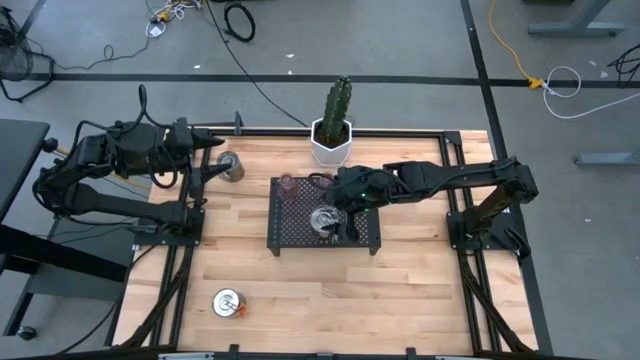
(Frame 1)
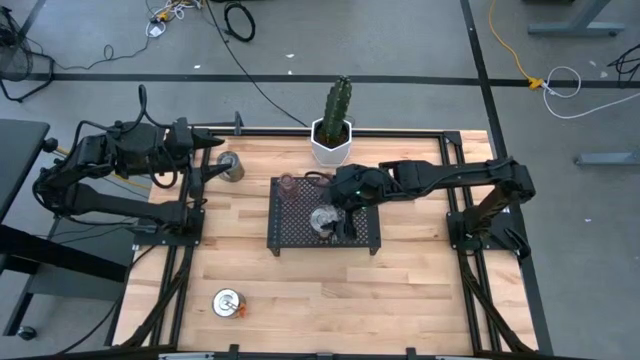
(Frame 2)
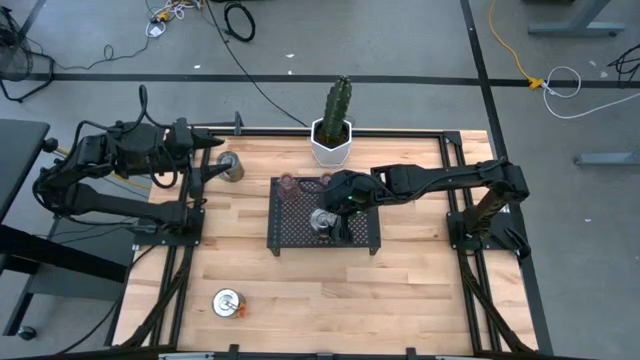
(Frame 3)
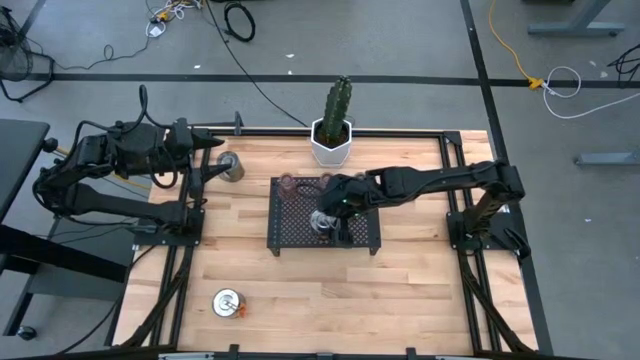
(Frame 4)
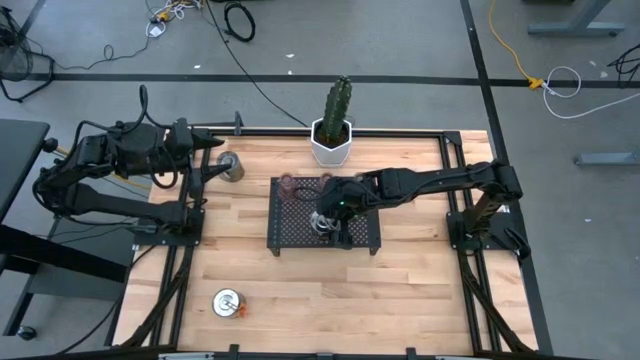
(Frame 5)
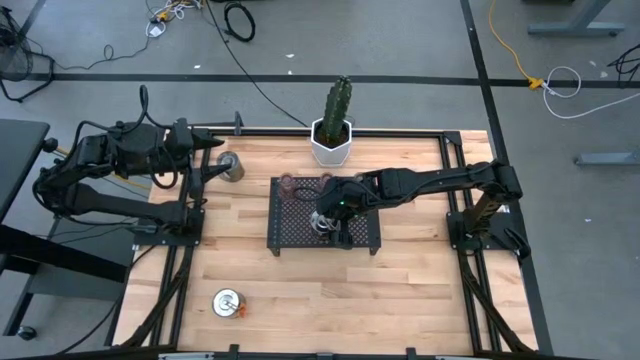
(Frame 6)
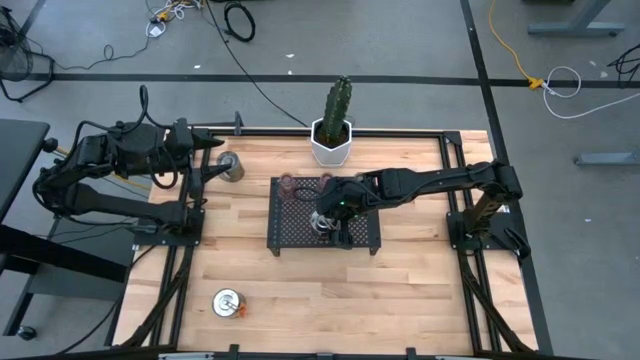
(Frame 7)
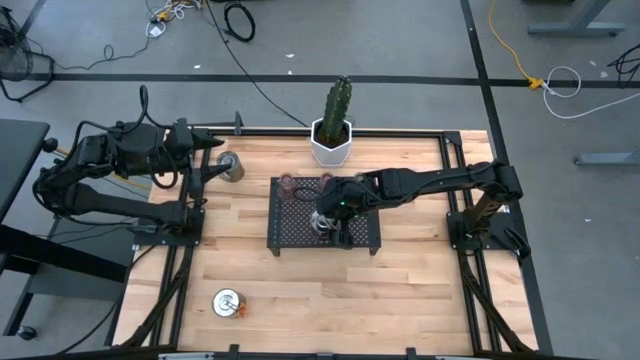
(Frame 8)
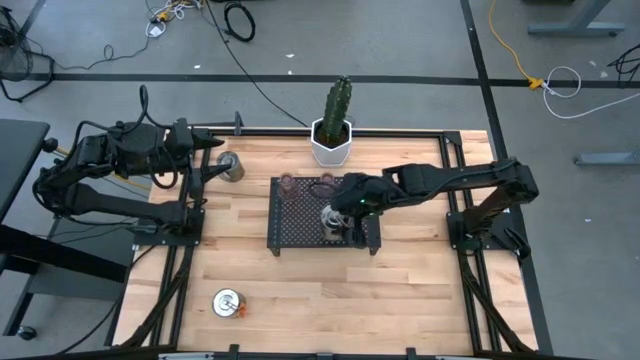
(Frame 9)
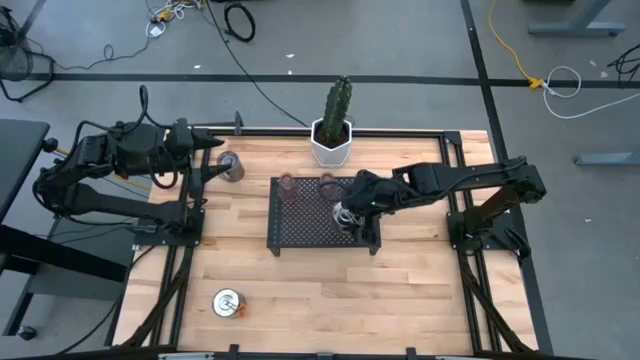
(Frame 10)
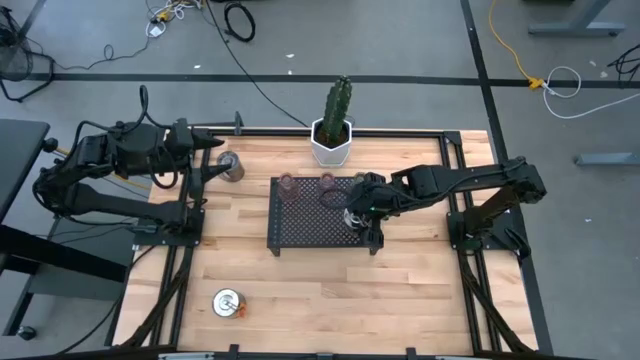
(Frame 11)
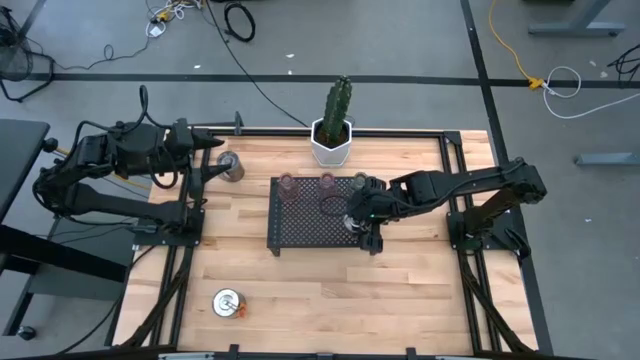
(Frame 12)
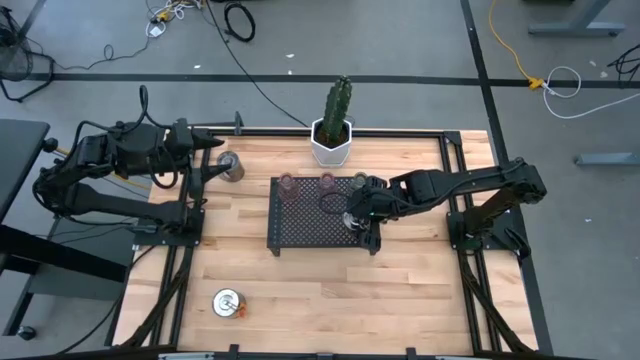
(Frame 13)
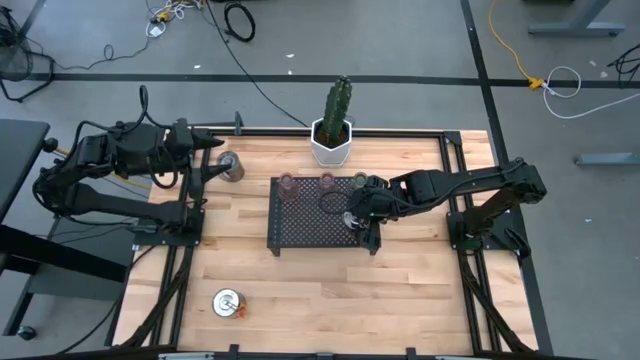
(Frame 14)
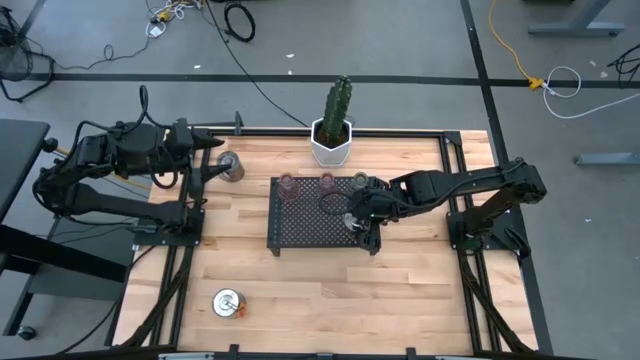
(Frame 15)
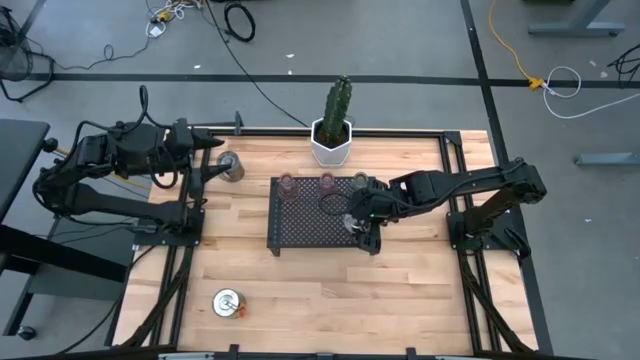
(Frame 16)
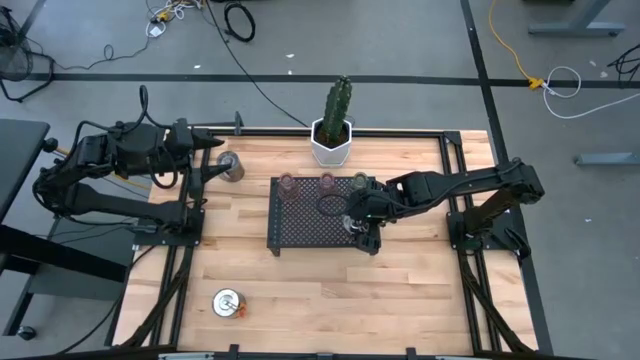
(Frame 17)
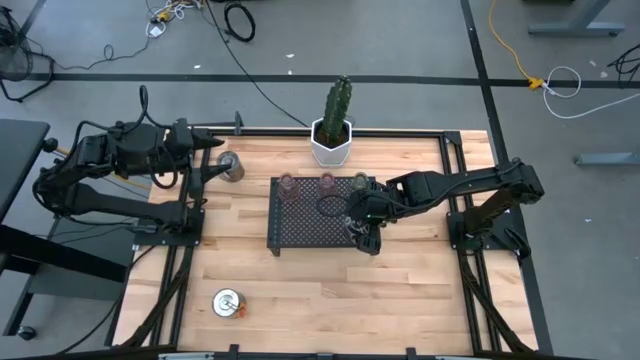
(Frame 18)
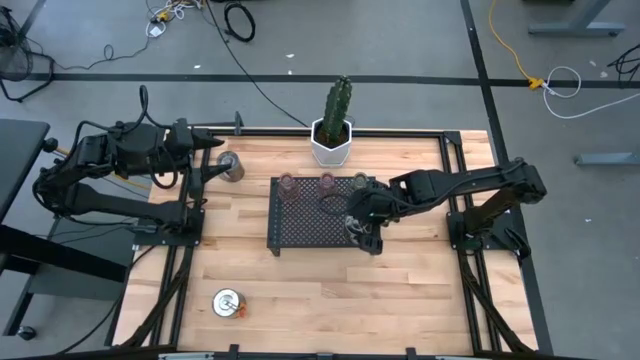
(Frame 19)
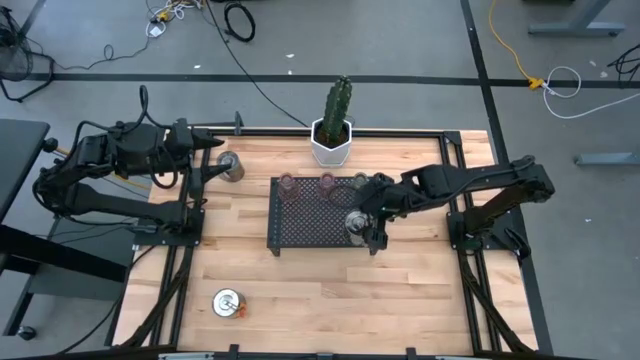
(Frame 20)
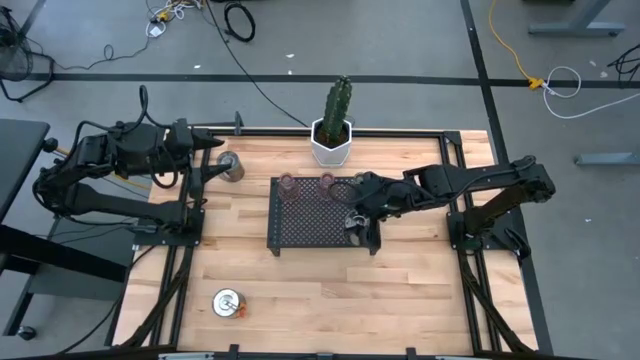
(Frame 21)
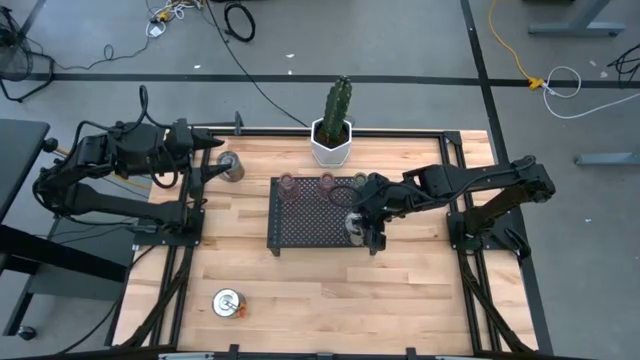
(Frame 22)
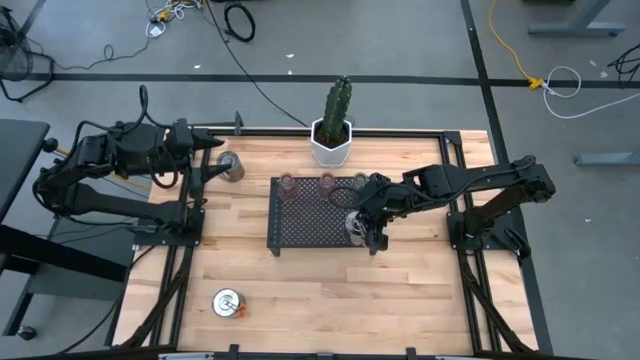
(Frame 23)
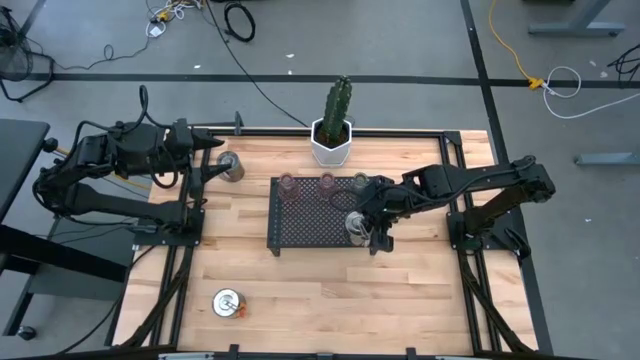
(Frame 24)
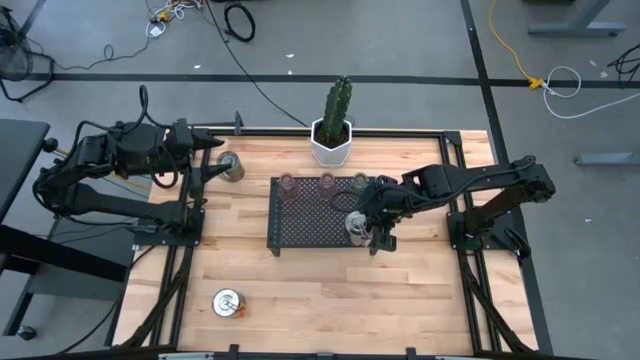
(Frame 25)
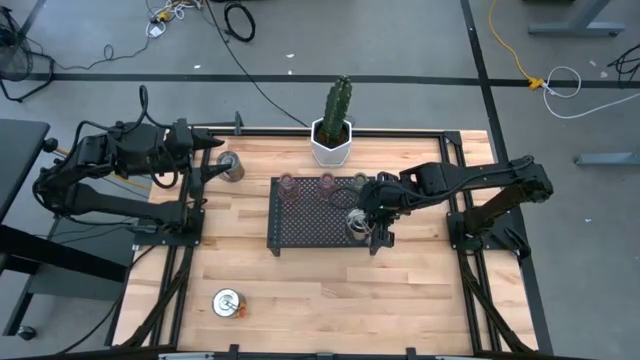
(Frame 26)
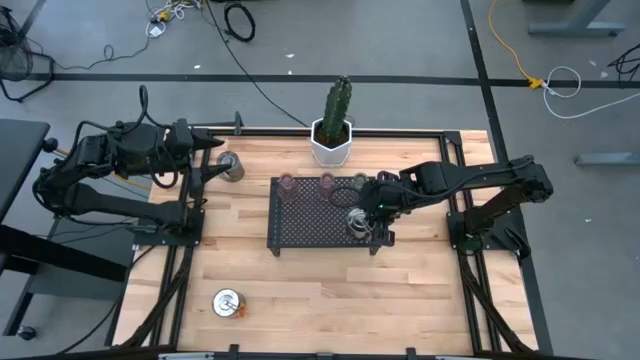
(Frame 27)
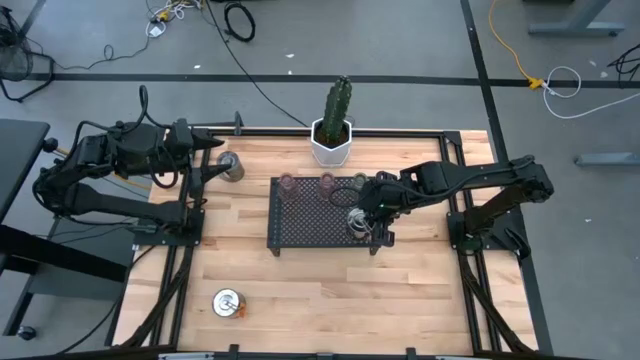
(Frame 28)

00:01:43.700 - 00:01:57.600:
Task: Pick & Place candle stick holders
Adjust the silver scented candle on the shelf

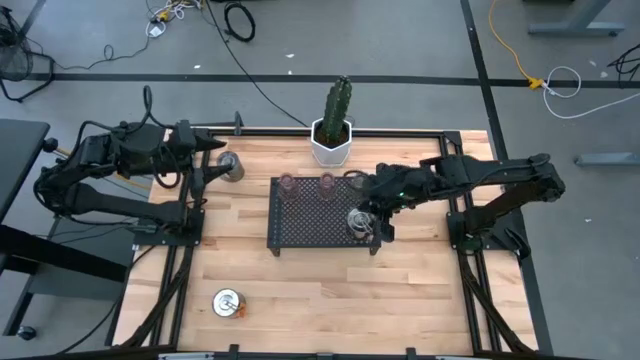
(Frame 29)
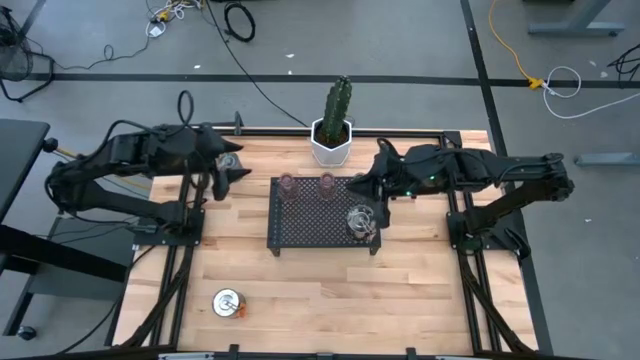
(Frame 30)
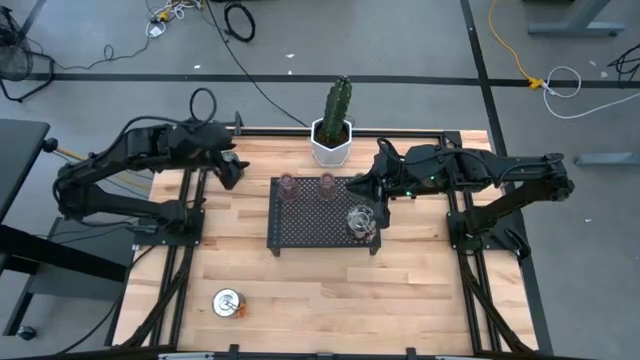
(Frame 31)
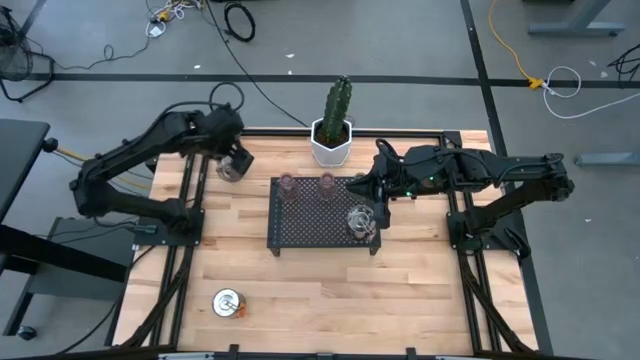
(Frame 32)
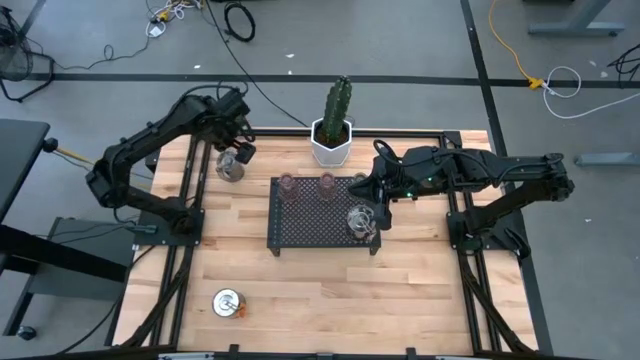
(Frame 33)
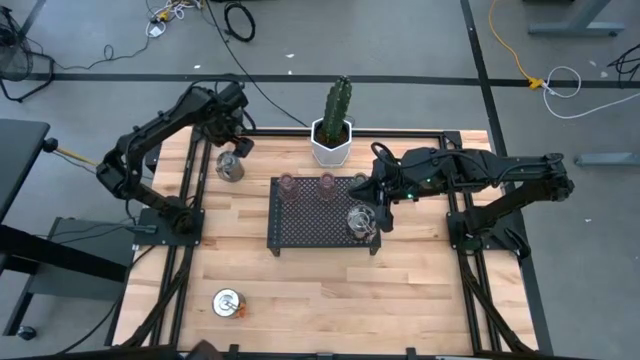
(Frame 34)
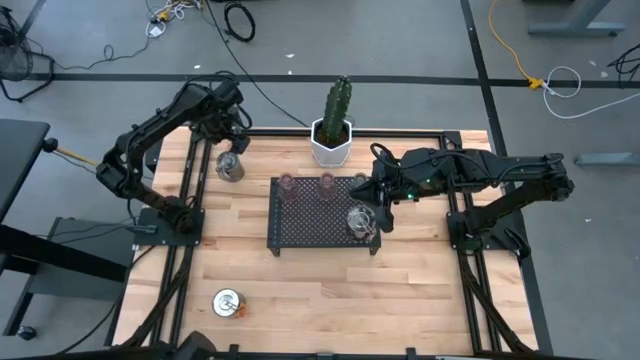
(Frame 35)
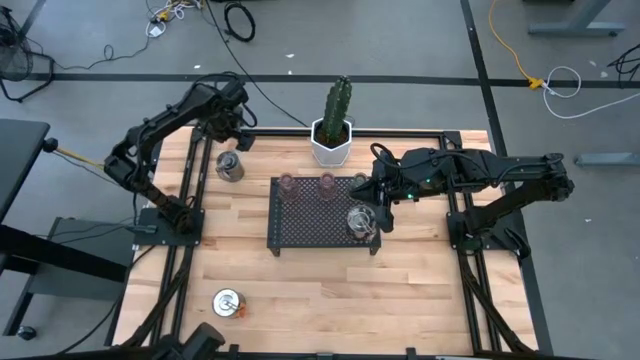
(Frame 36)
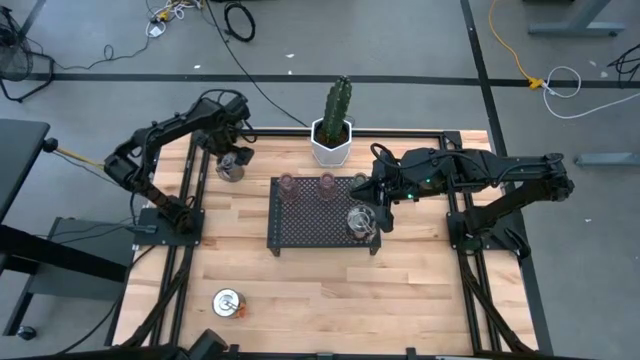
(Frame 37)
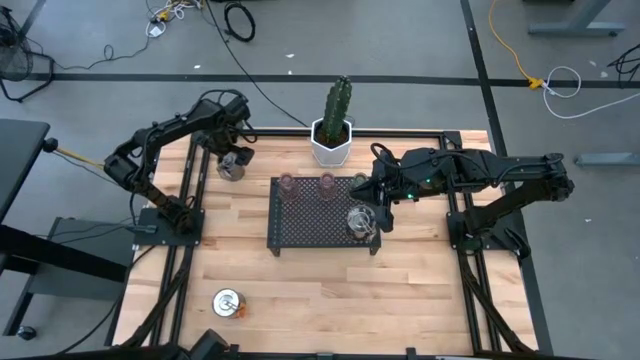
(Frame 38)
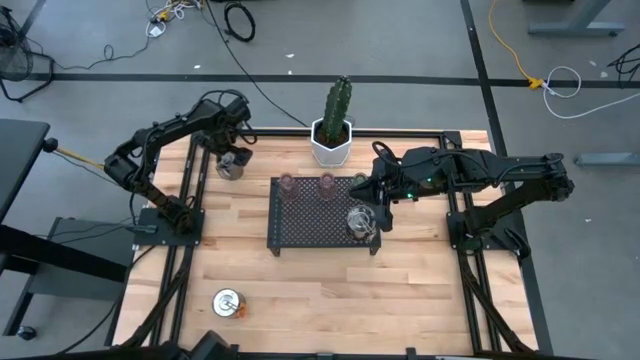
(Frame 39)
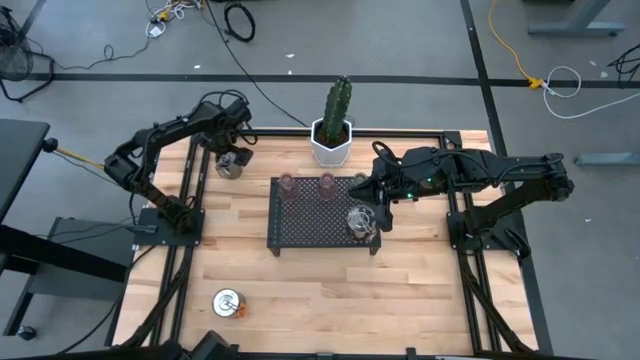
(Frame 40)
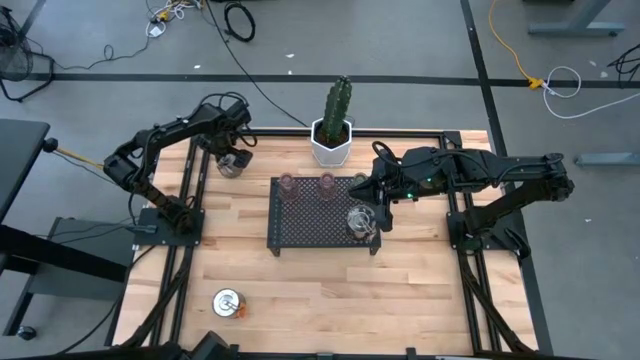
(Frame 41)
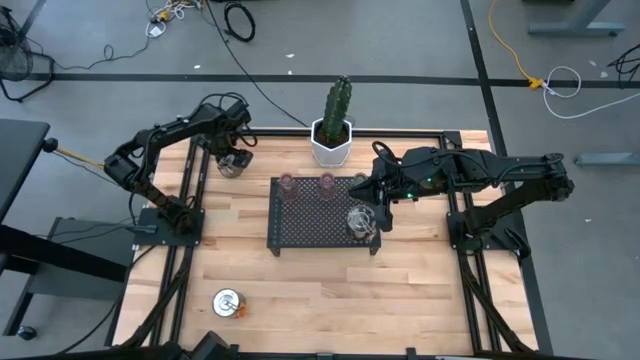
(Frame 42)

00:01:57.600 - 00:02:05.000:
Put the top silver scented candle on the shelf
